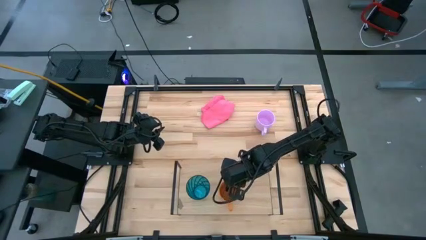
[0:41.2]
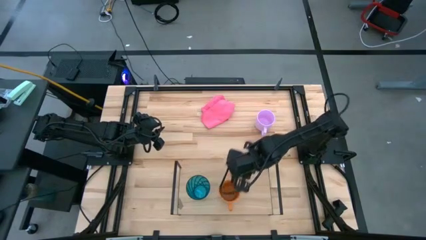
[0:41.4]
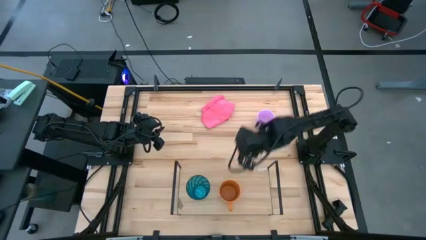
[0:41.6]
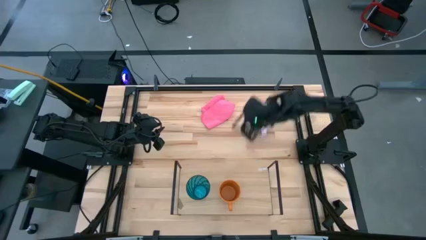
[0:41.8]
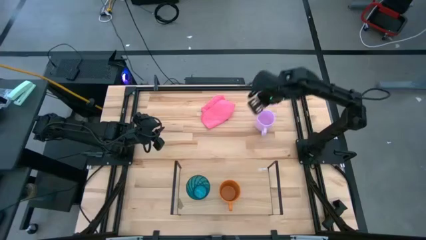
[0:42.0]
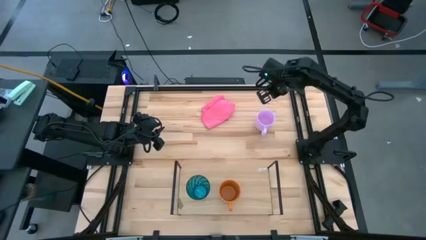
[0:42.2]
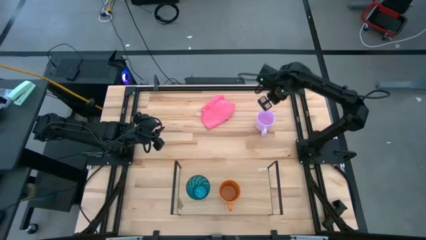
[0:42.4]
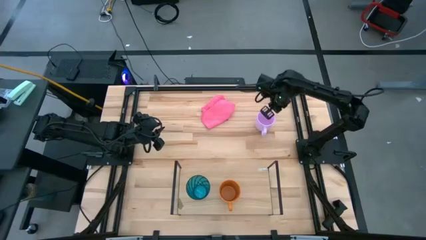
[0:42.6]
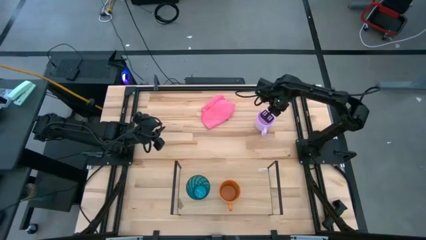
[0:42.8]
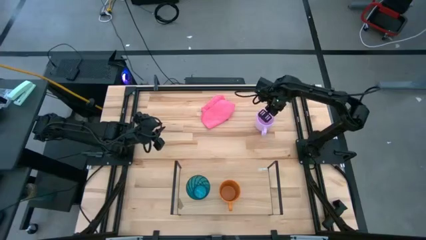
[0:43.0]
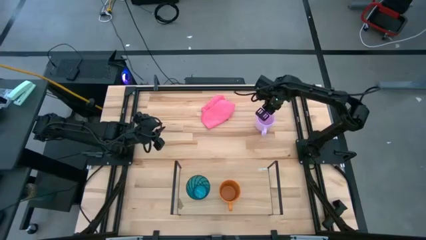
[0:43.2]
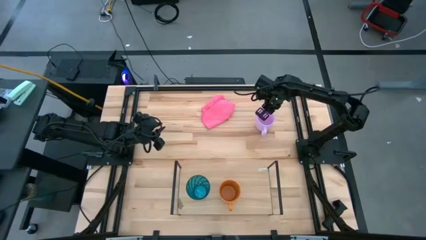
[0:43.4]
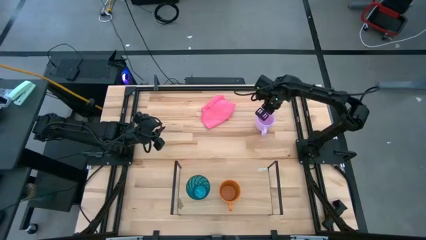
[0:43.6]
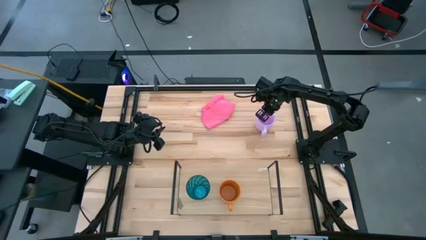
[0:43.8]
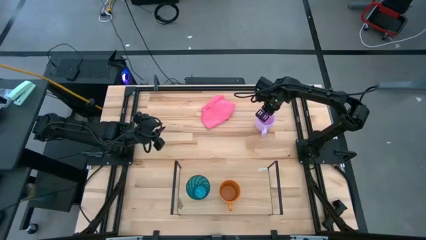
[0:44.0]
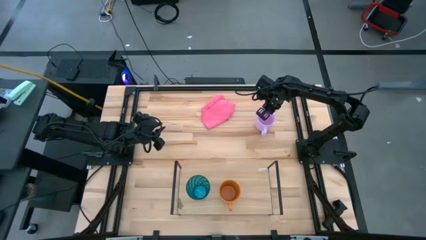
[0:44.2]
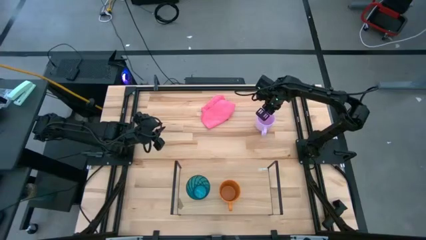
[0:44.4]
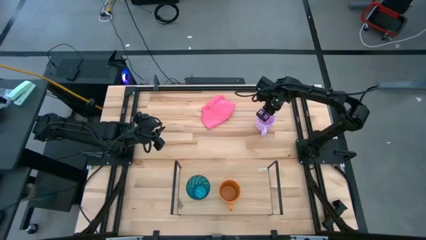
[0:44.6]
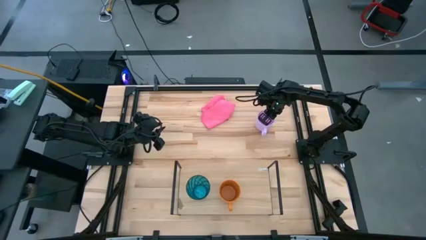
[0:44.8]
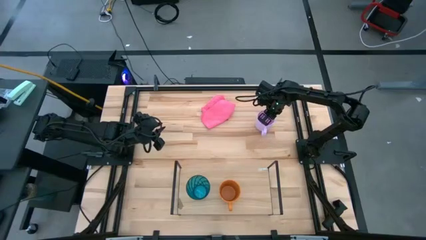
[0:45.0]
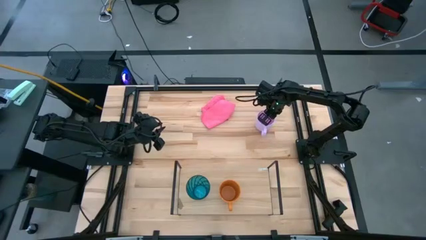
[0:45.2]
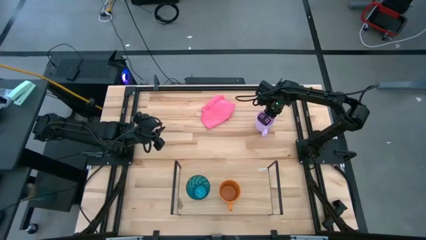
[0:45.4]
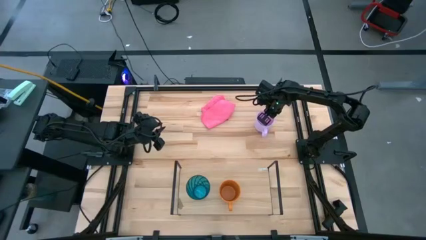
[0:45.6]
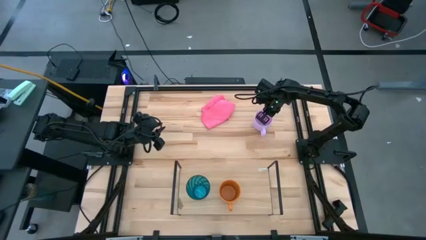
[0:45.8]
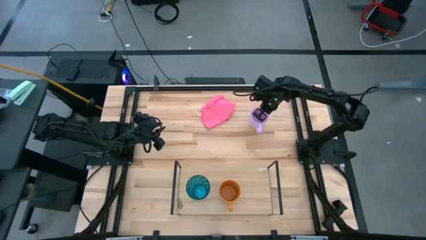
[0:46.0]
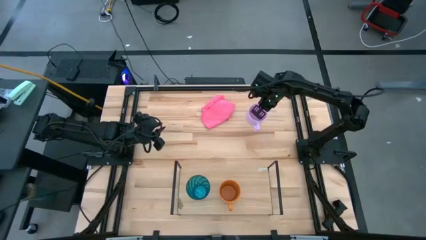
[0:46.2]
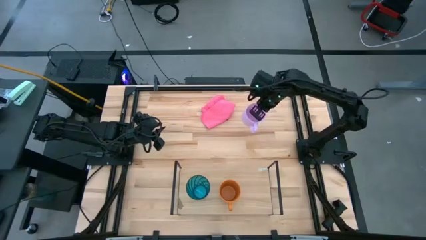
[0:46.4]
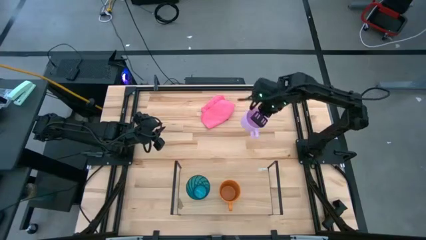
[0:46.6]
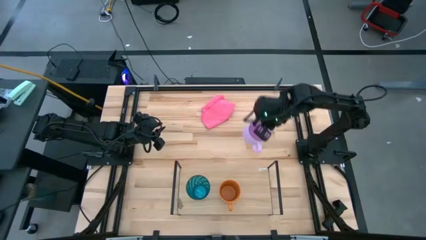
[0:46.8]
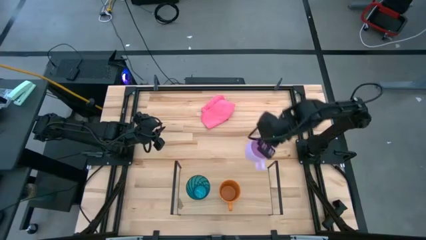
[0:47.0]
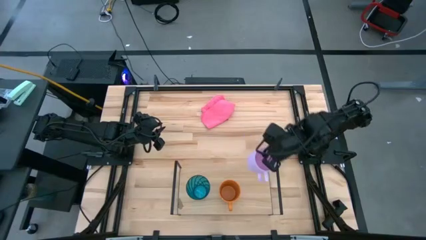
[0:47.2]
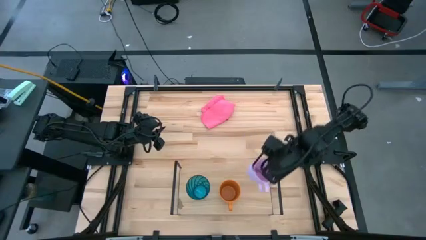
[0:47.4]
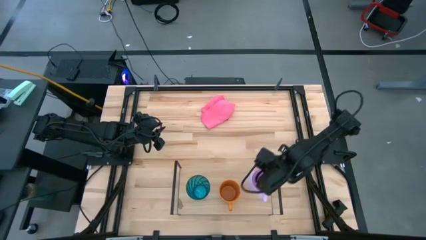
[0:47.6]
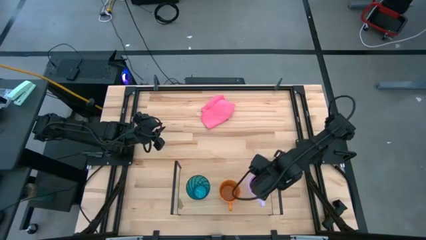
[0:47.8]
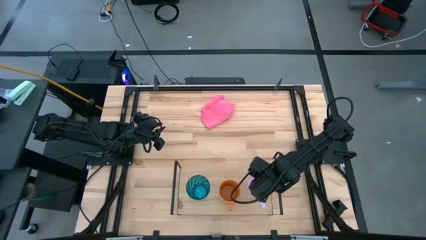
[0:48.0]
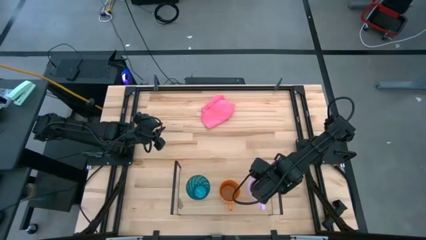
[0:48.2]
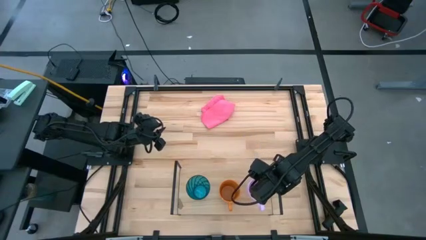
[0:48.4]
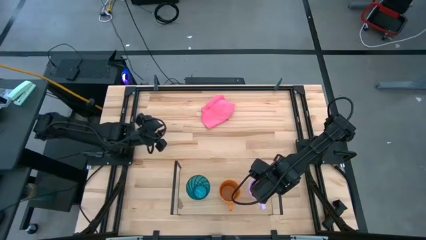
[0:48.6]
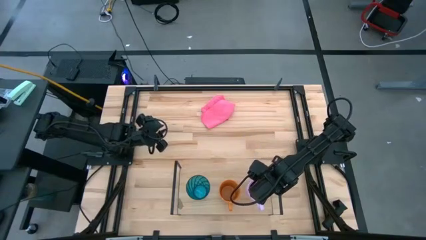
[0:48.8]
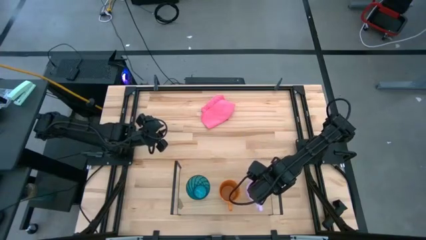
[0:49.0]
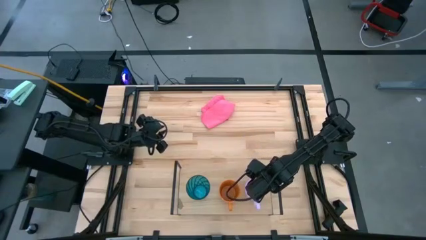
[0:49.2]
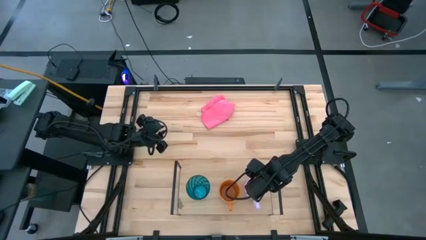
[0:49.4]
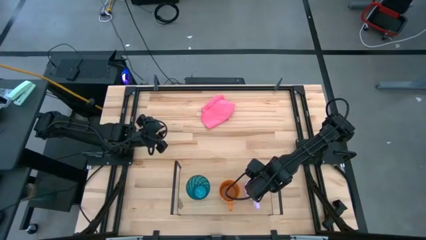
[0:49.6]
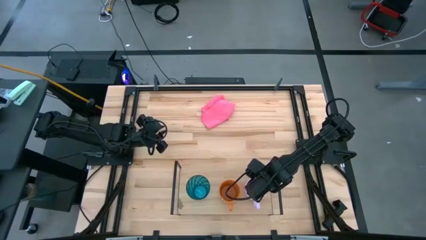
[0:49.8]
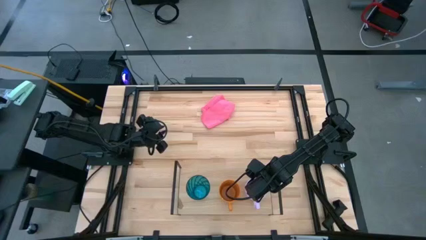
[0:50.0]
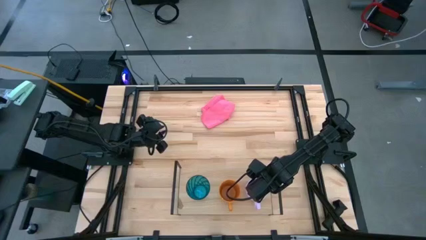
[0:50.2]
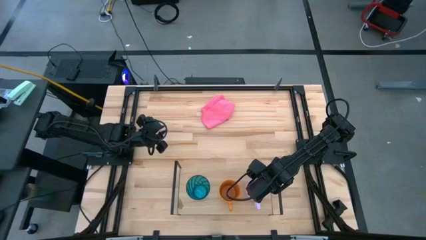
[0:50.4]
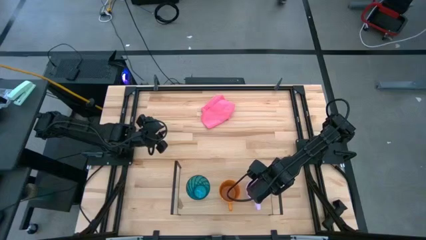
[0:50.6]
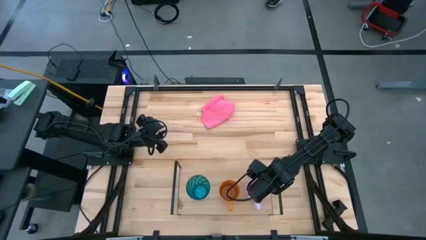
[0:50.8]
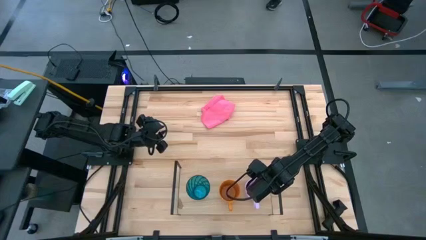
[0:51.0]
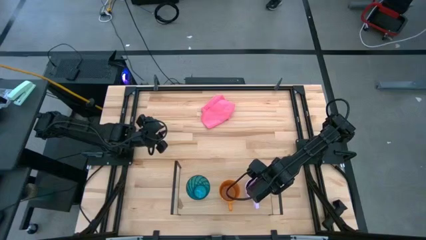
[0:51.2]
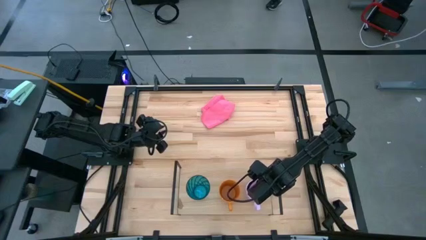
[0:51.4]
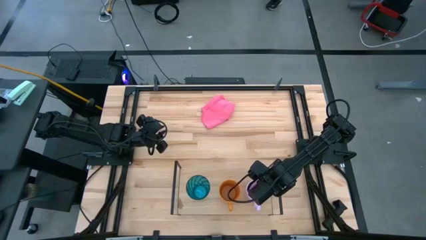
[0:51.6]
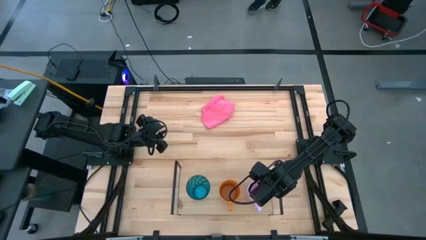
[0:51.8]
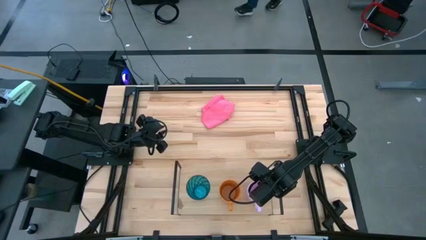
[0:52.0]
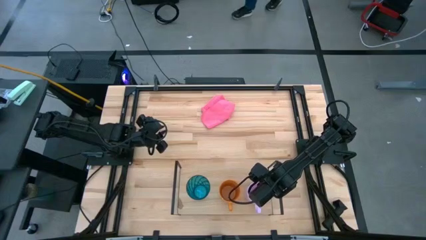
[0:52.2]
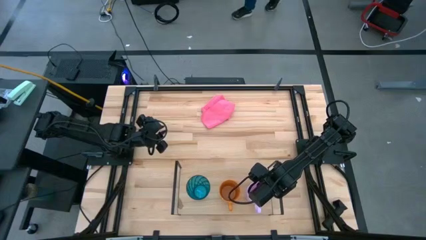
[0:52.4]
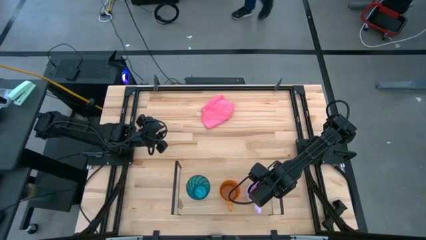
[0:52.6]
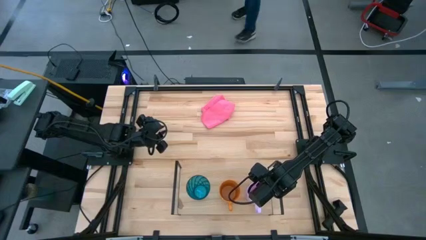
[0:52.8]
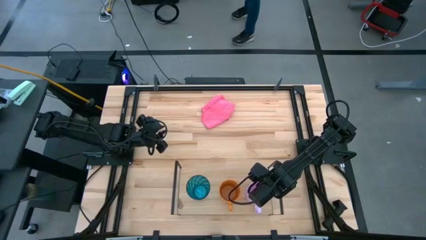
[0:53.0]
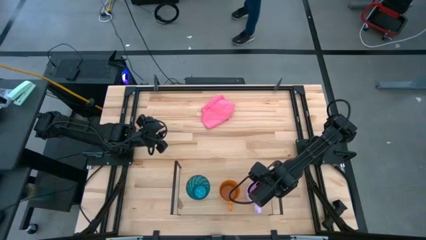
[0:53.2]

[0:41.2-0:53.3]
Task: Stack small to large cups/mugs on shelf
Put the purple mug on the shelf
